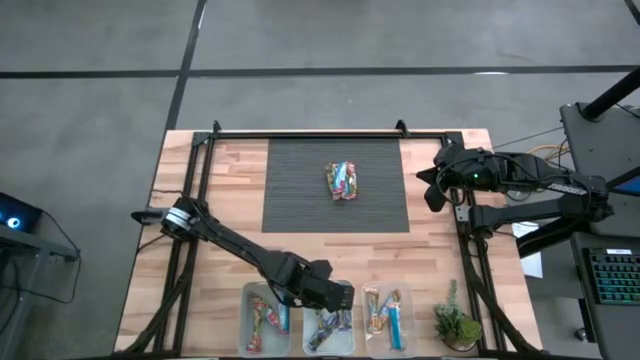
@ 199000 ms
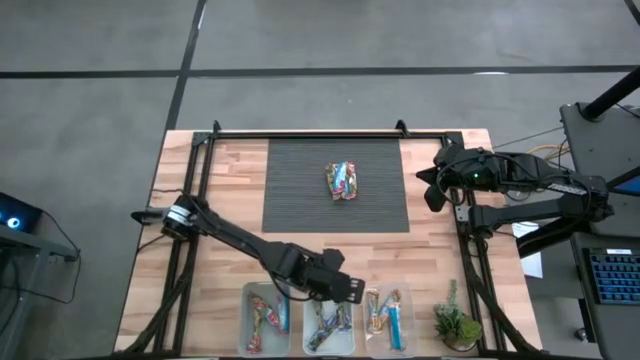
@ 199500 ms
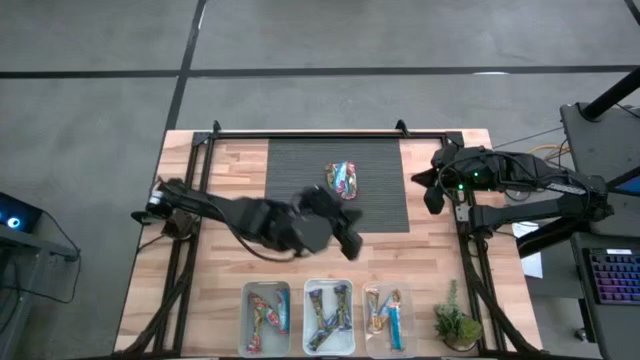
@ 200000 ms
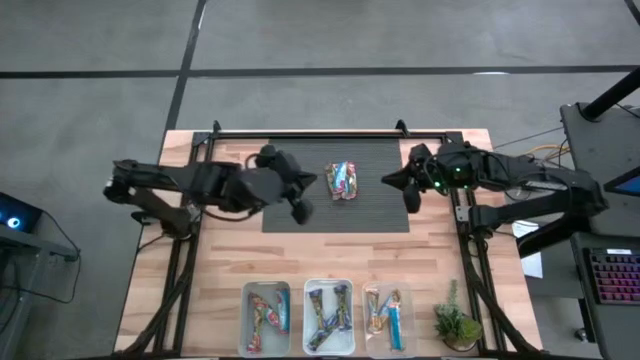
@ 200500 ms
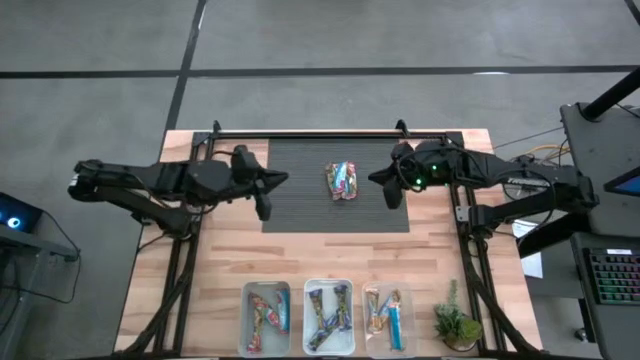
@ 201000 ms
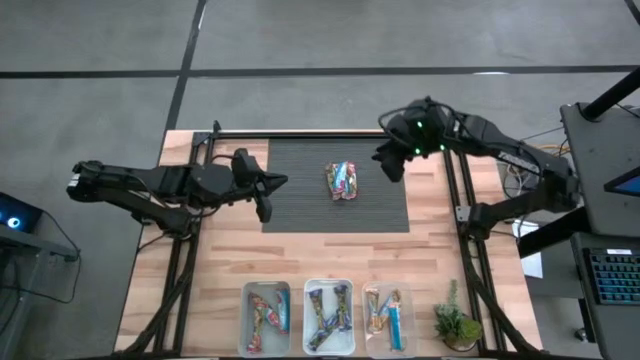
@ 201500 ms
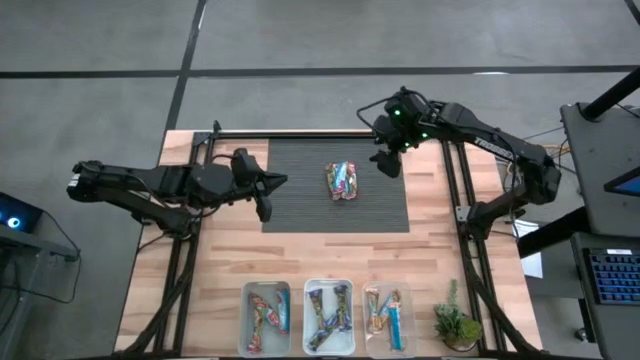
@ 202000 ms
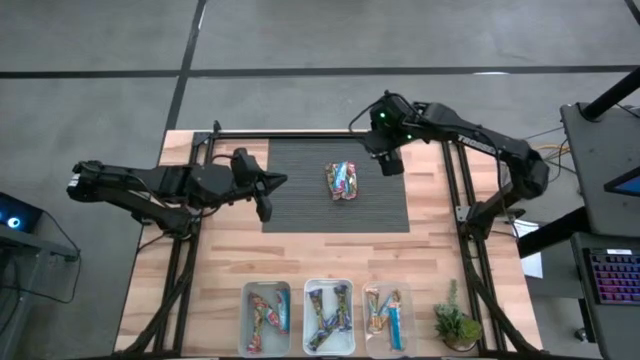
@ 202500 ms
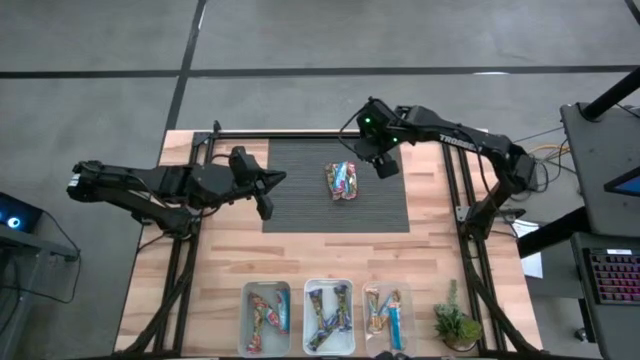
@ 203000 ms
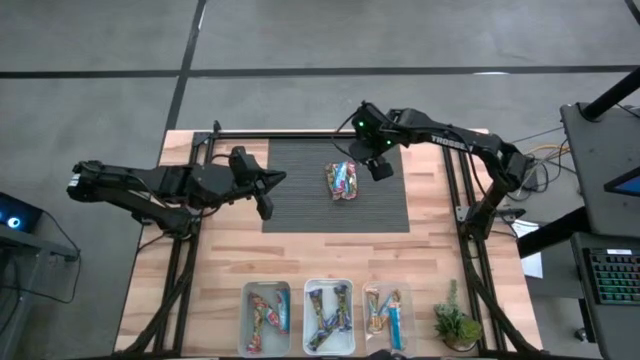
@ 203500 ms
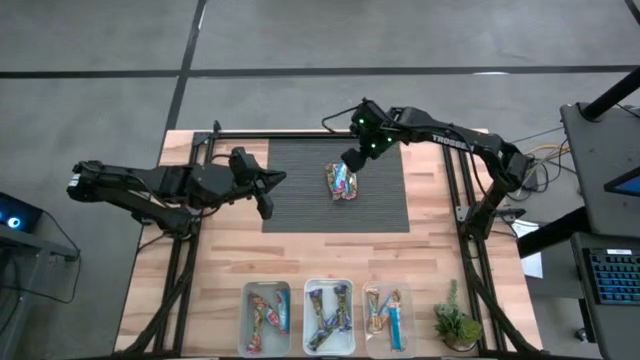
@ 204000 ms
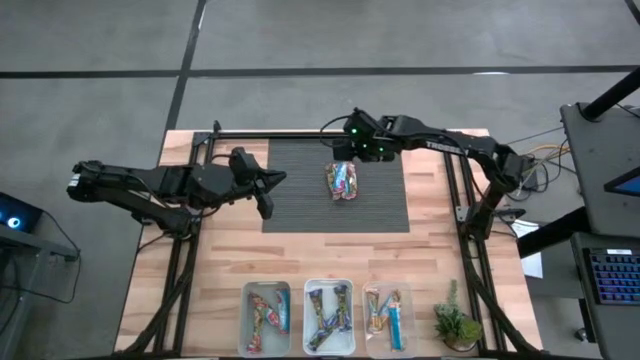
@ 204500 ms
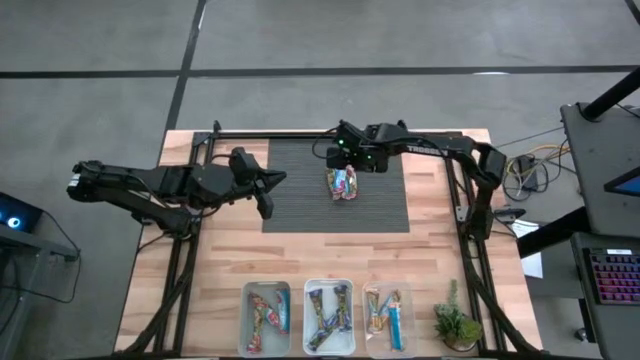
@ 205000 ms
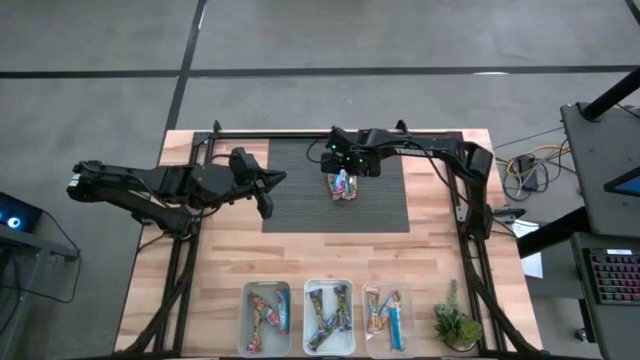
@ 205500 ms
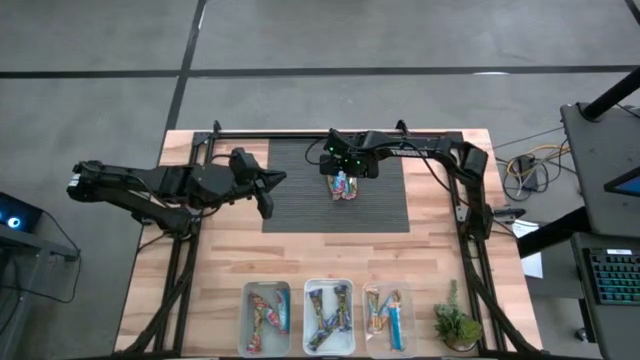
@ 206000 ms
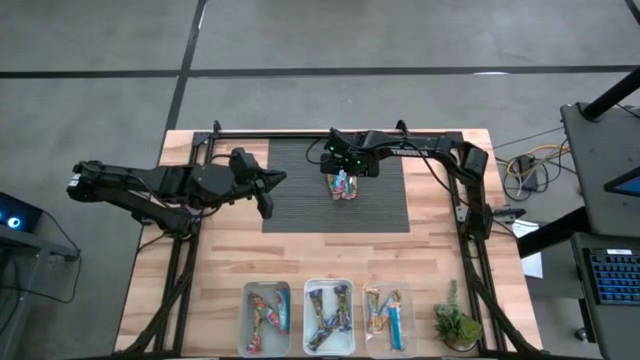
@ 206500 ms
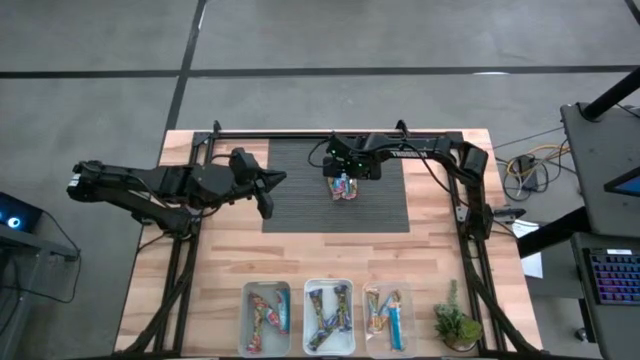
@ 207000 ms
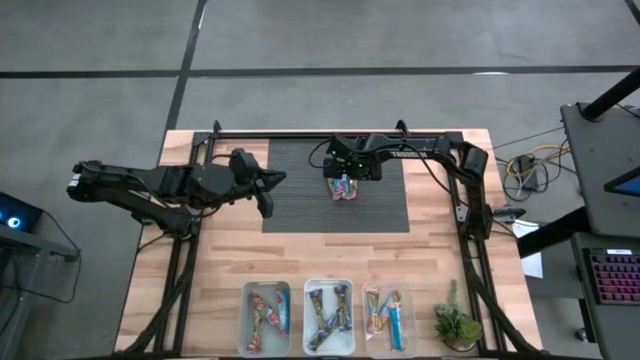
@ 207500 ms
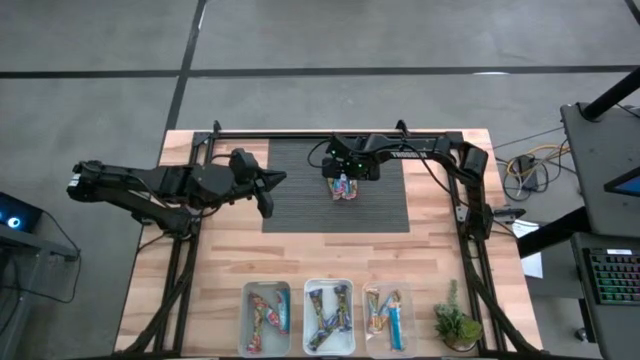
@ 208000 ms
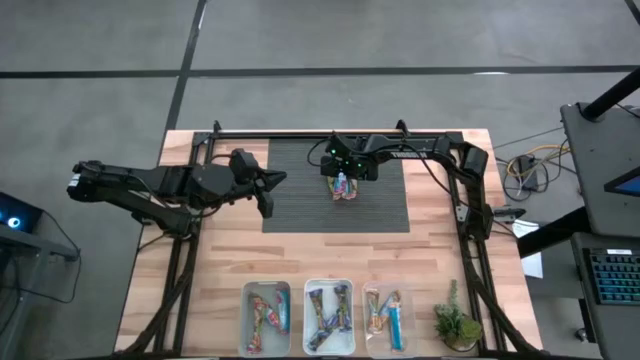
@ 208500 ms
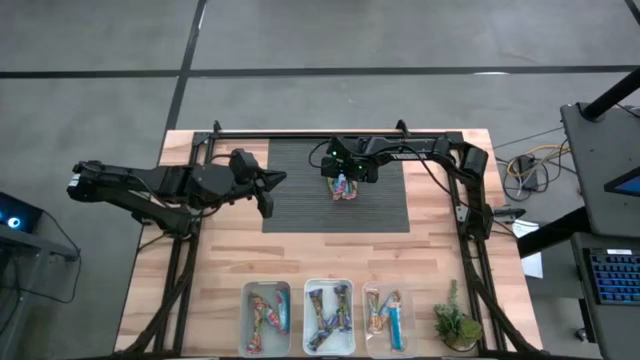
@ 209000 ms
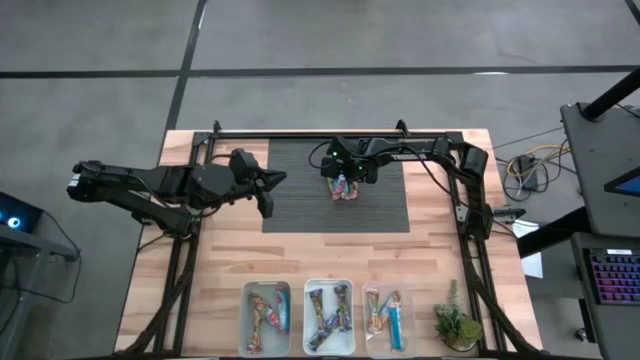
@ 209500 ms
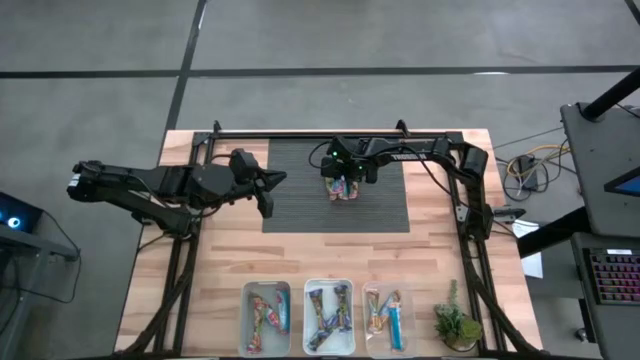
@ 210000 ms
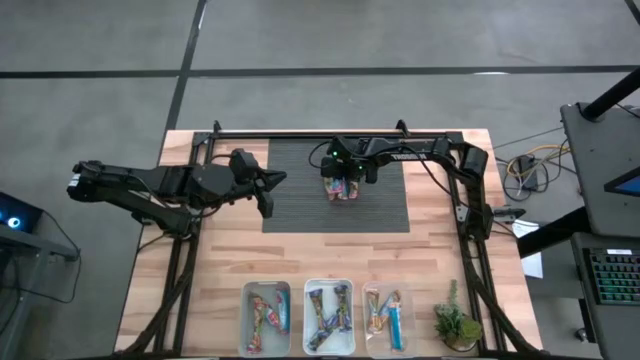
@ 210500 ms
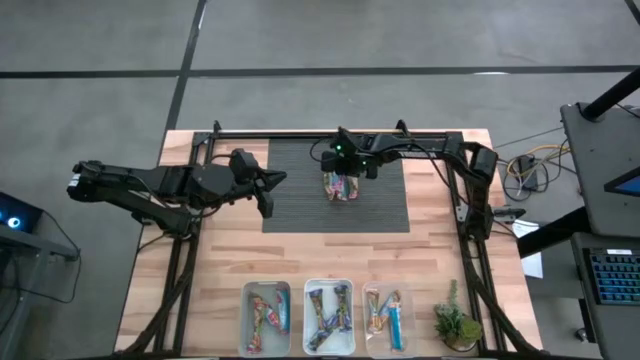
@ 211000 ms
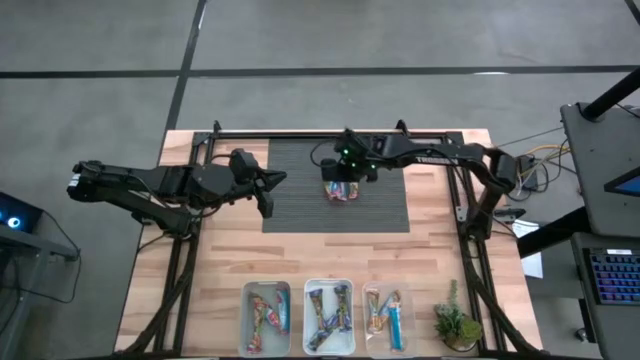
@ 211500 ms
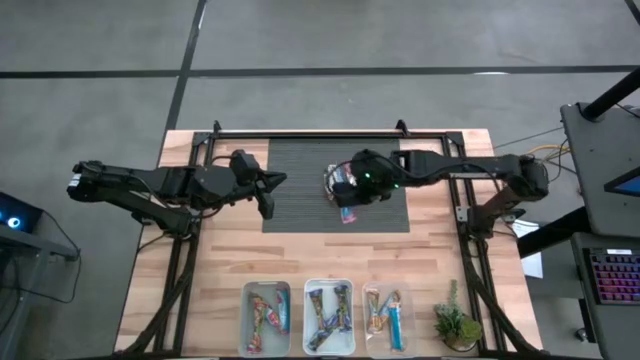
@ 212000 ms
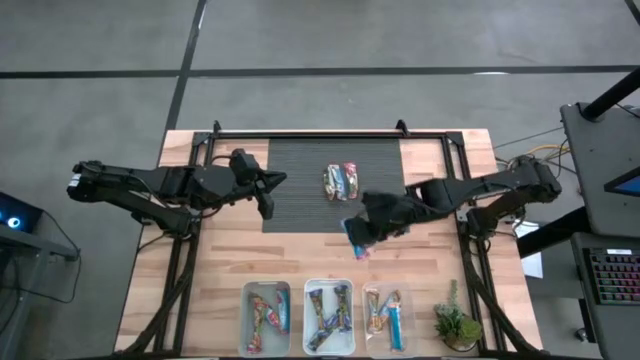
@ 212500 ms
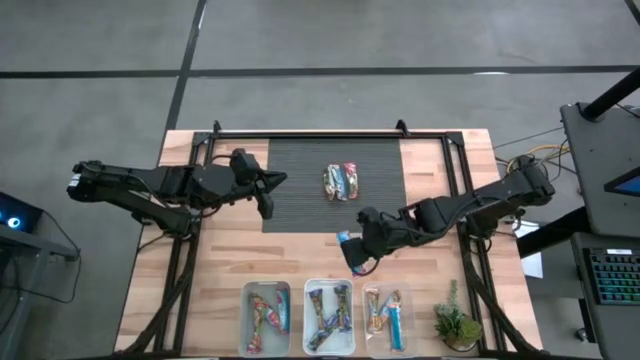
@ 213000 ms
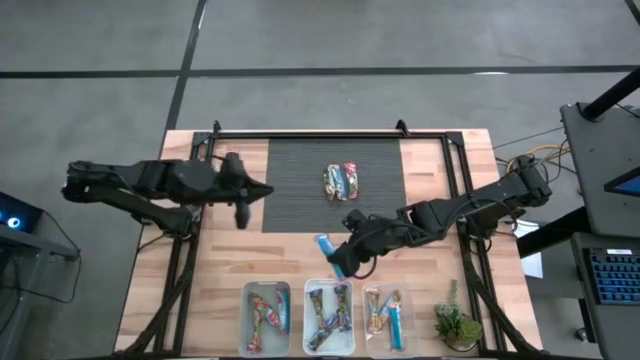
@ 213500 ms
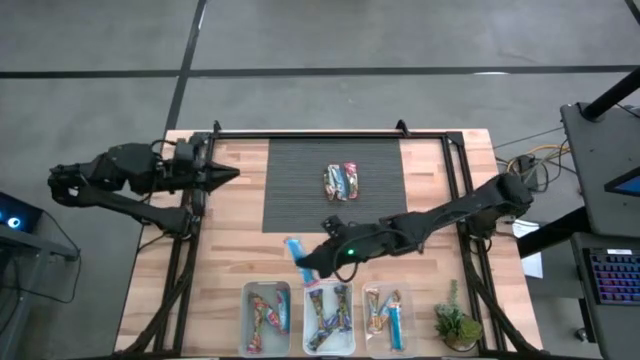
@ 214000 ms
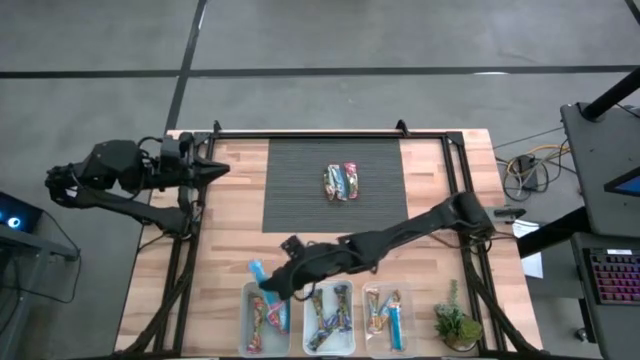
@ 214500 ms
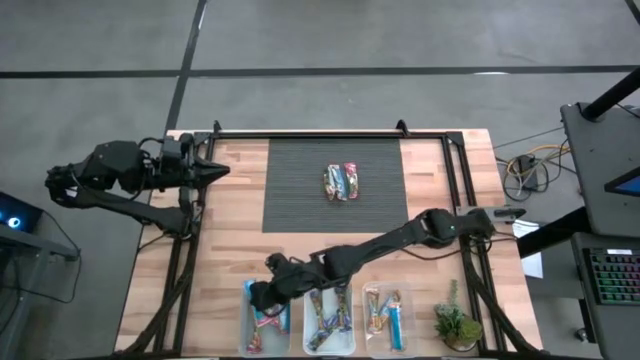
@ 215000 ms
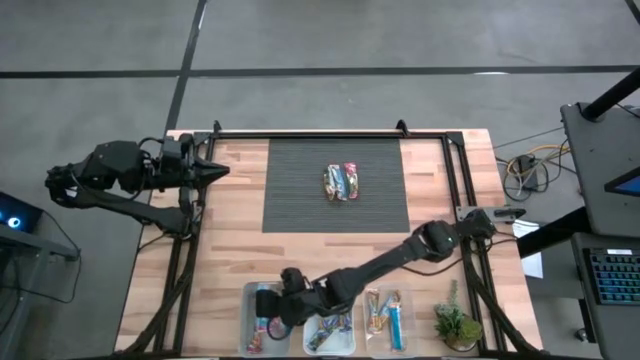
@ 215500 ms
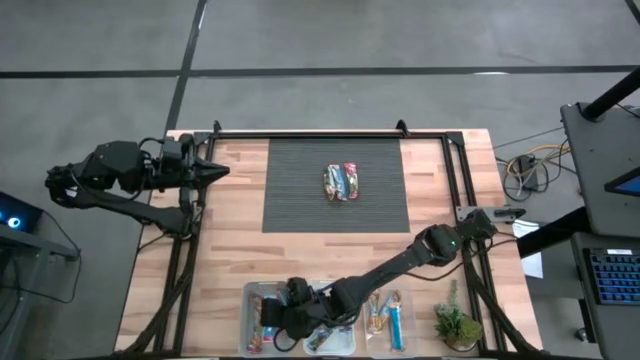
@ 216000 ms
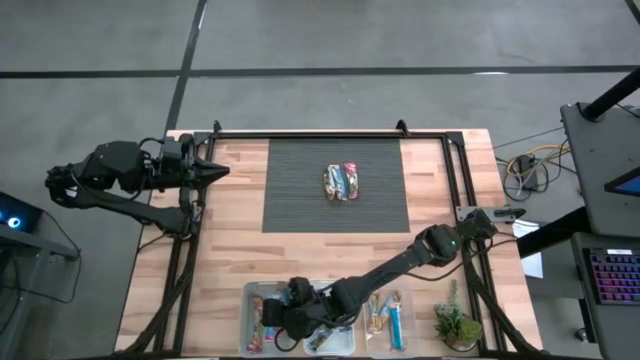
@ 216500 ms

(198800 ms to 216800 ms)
Task: Pick and place Granola Bars by type
Put the left red granola bar into the gray bin

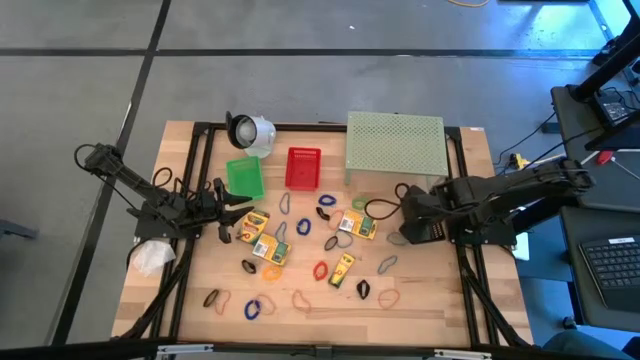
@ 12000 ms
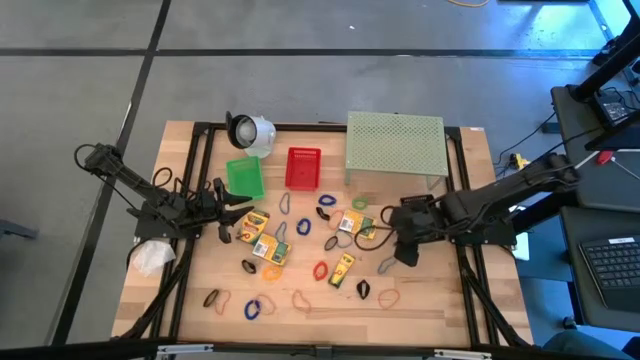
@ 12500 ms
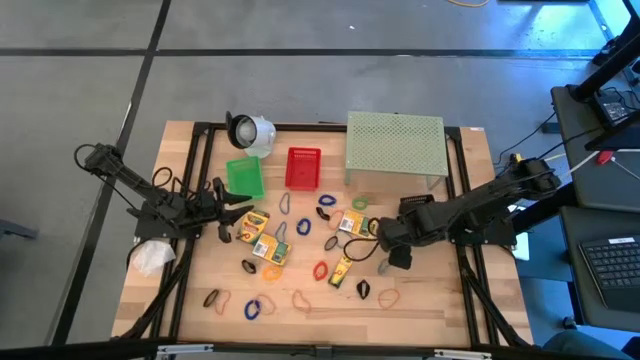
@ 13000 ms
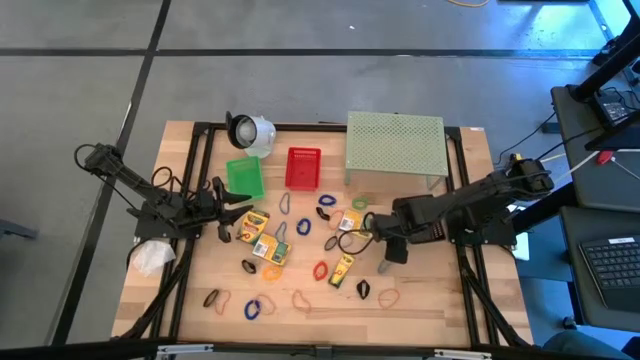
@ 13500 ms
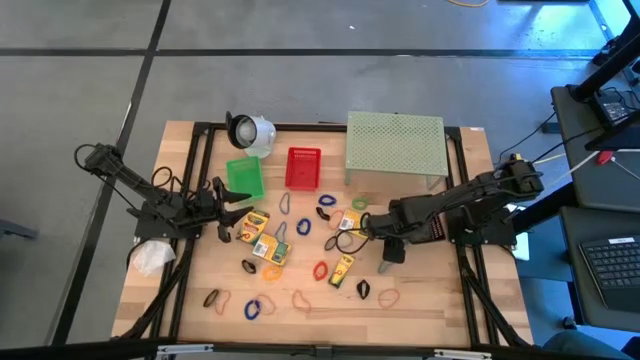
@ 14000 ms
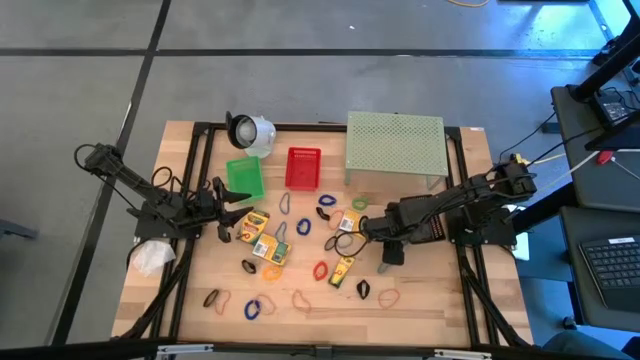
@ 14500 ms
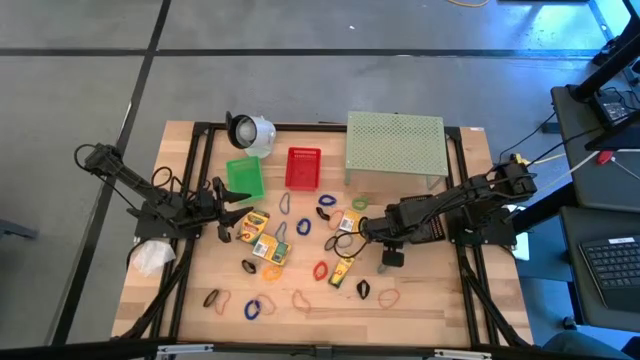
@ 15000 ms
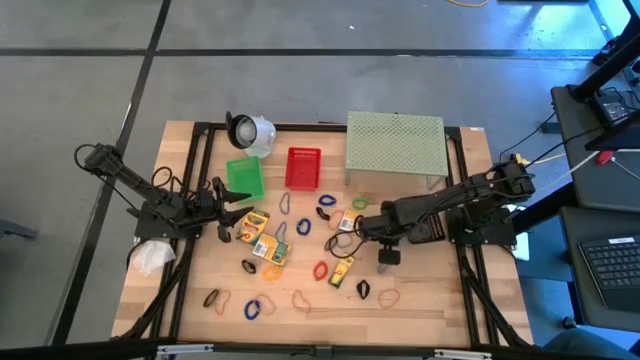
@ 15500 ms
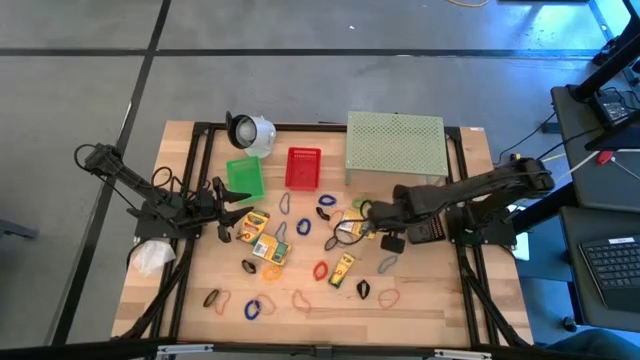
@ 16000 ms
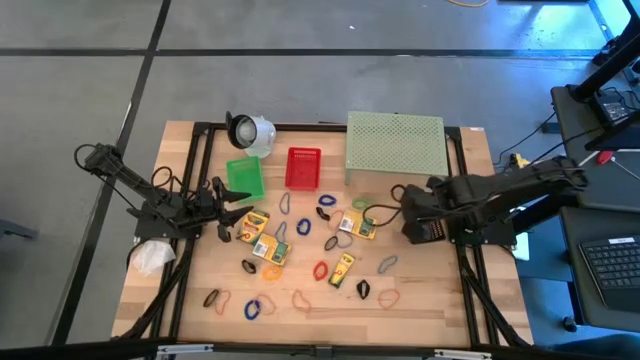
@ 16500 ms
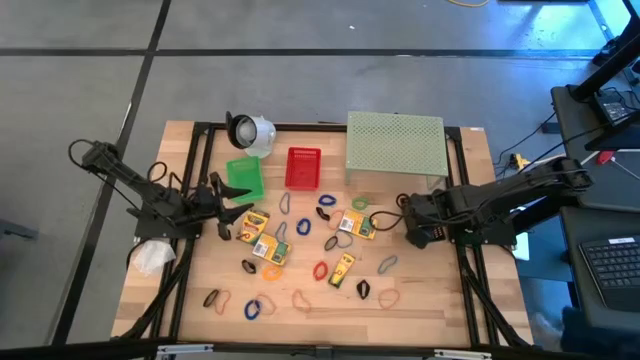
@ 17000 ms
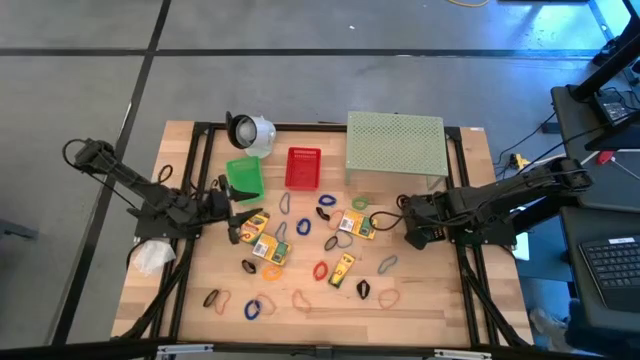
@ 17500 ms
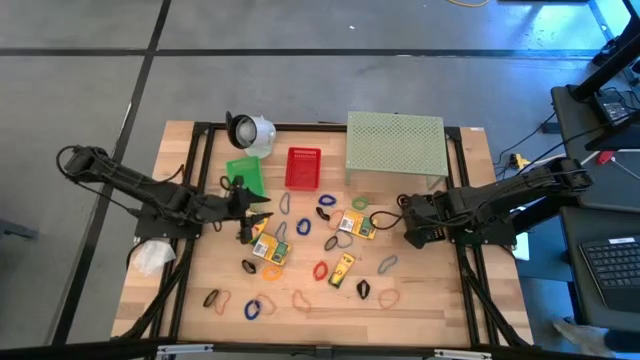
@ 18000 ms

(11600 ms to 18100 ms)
Task: Pick & Place Office Desk Supplies
Put the blue rubber band into the black basket
